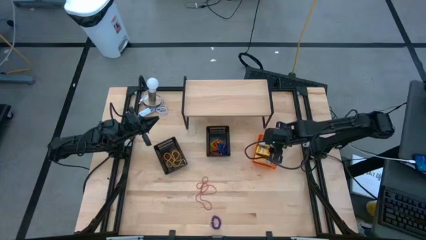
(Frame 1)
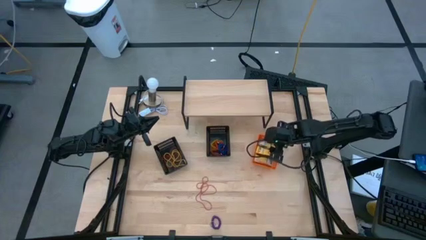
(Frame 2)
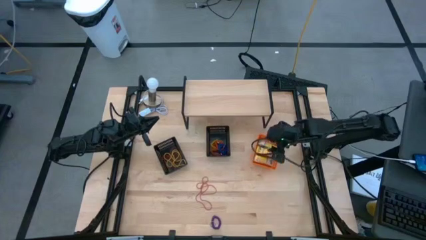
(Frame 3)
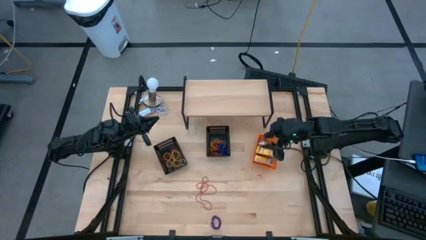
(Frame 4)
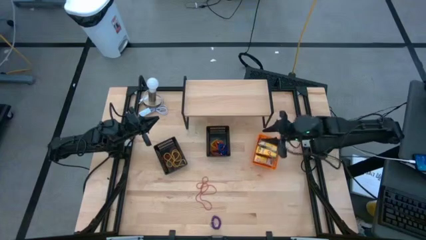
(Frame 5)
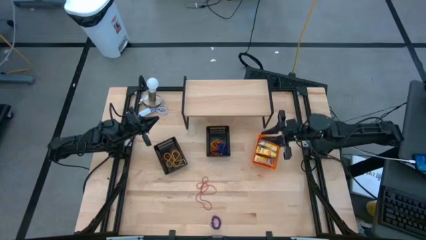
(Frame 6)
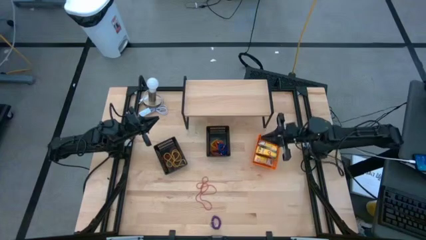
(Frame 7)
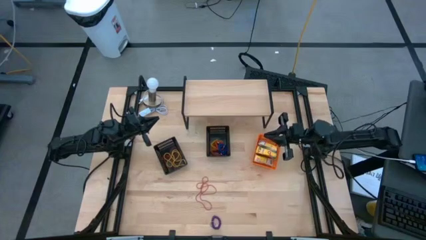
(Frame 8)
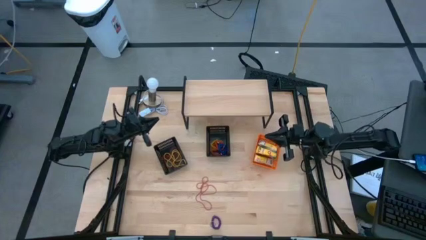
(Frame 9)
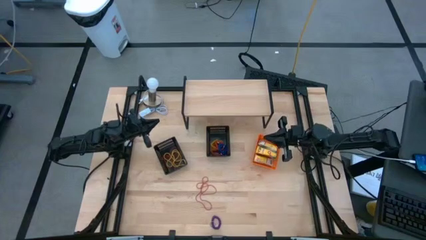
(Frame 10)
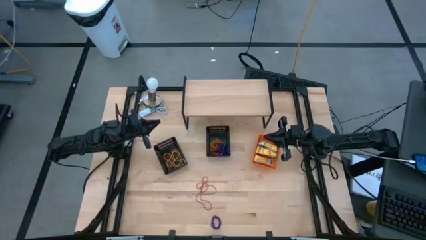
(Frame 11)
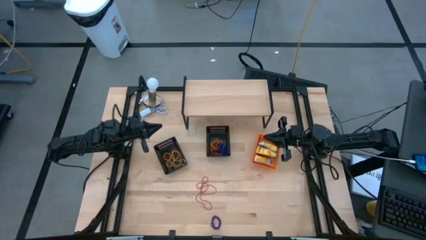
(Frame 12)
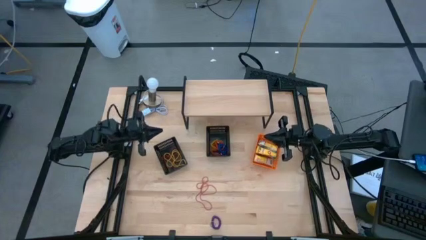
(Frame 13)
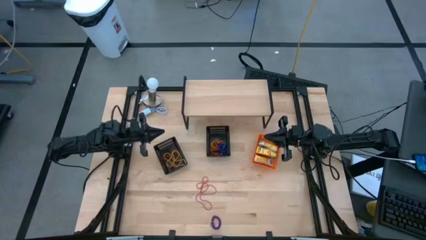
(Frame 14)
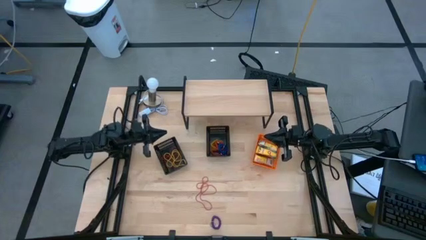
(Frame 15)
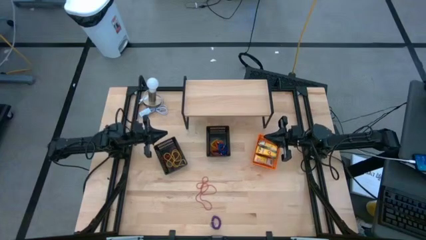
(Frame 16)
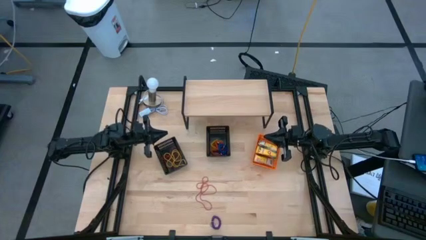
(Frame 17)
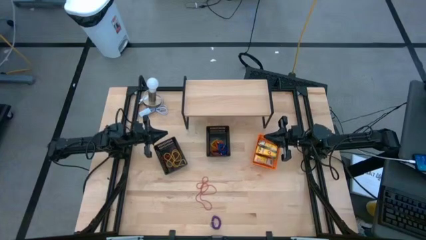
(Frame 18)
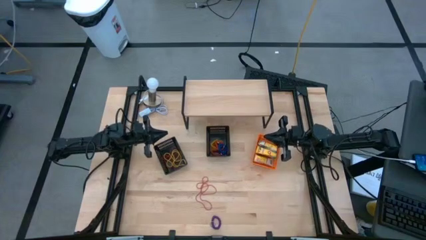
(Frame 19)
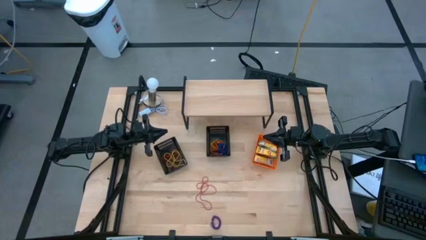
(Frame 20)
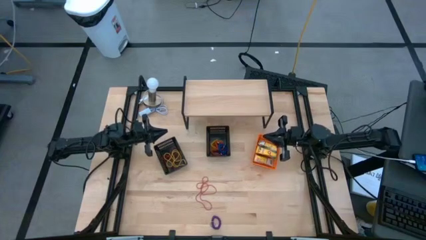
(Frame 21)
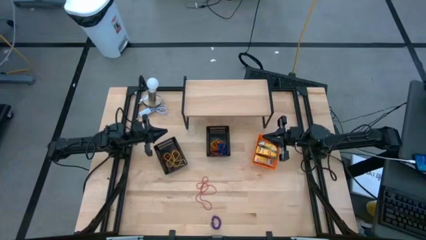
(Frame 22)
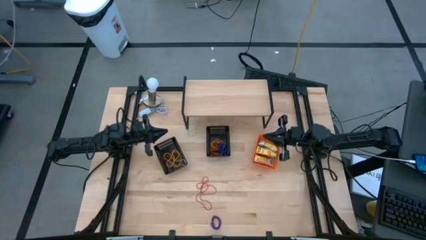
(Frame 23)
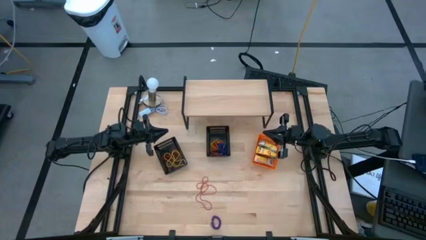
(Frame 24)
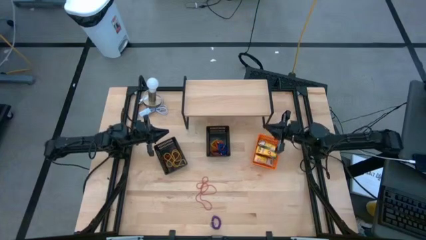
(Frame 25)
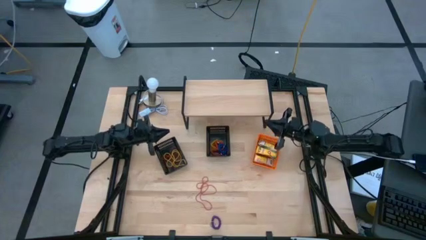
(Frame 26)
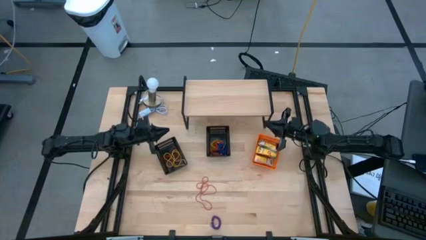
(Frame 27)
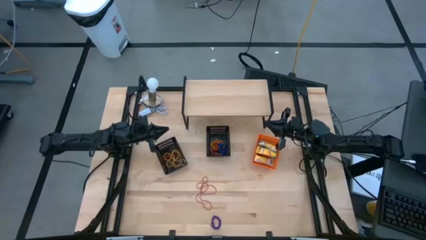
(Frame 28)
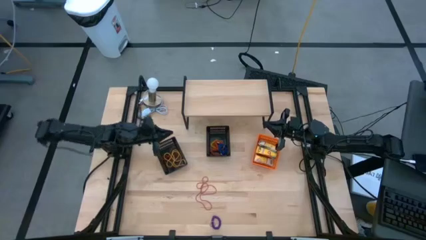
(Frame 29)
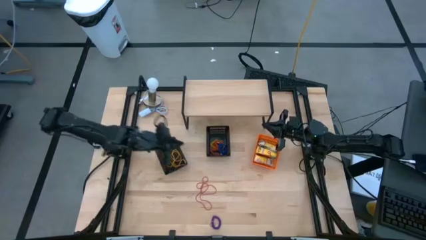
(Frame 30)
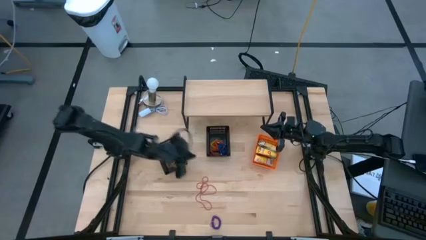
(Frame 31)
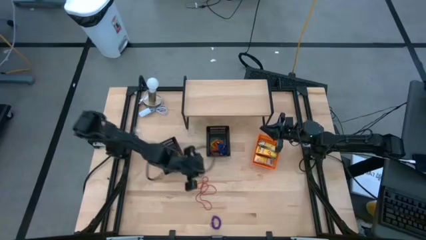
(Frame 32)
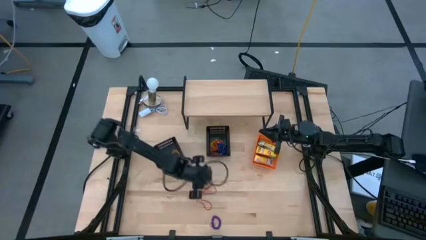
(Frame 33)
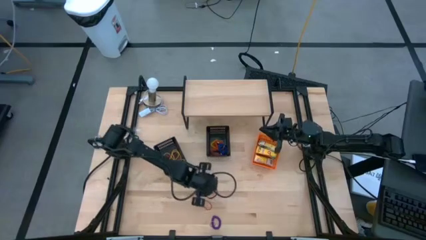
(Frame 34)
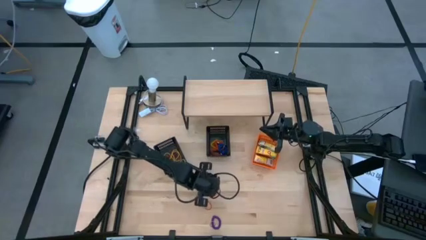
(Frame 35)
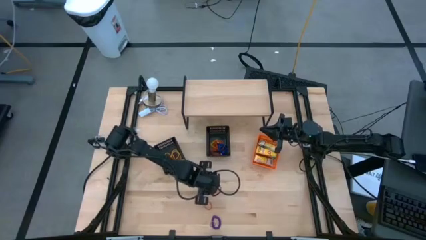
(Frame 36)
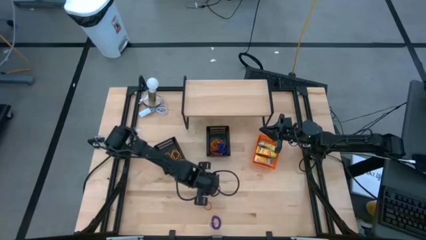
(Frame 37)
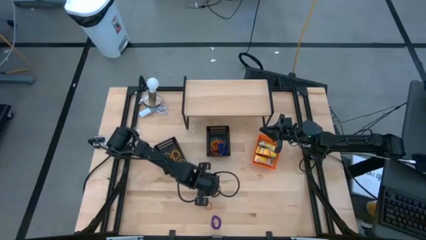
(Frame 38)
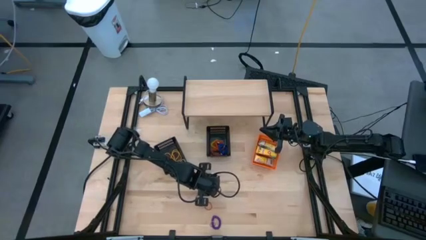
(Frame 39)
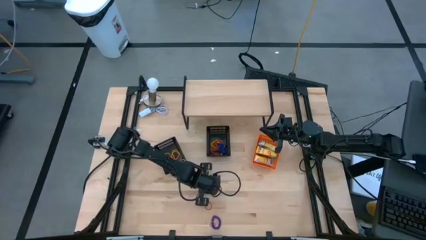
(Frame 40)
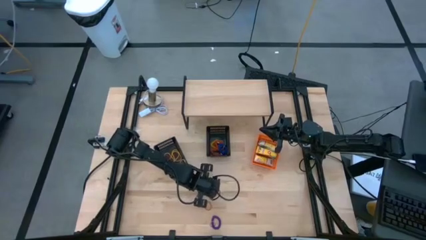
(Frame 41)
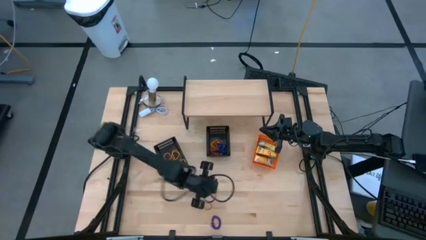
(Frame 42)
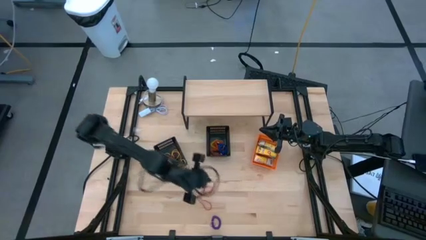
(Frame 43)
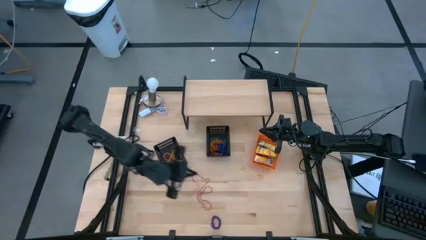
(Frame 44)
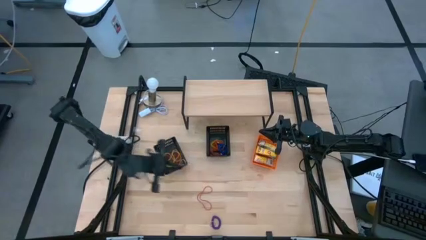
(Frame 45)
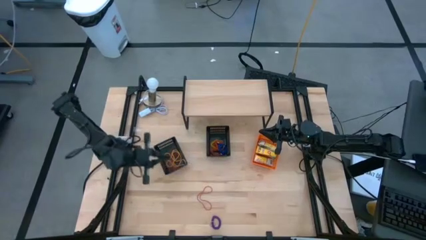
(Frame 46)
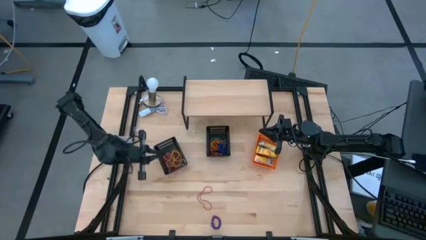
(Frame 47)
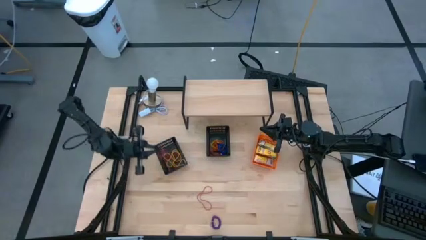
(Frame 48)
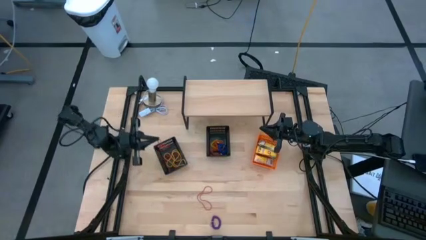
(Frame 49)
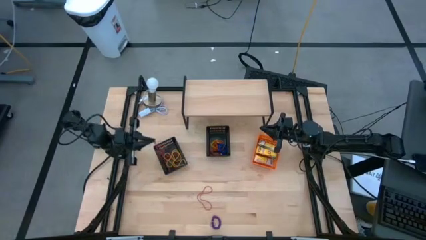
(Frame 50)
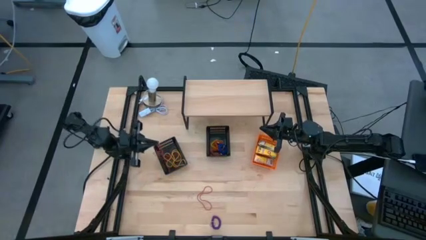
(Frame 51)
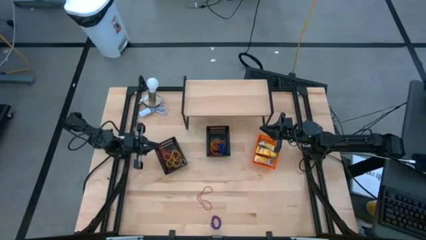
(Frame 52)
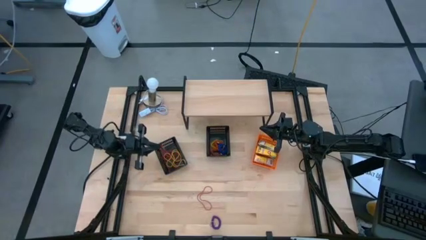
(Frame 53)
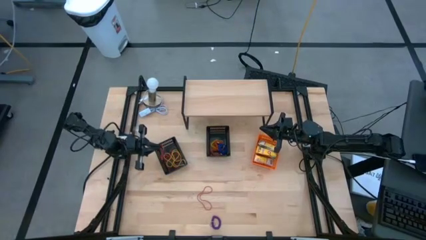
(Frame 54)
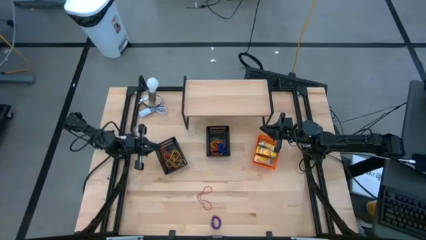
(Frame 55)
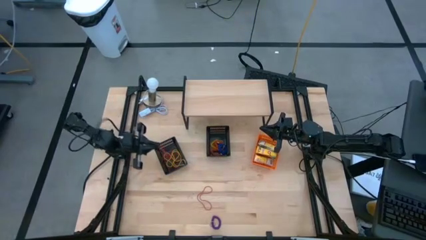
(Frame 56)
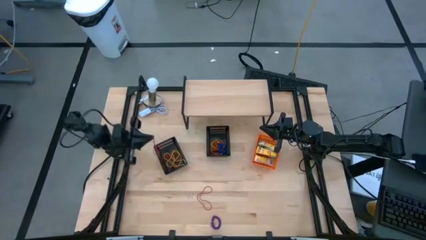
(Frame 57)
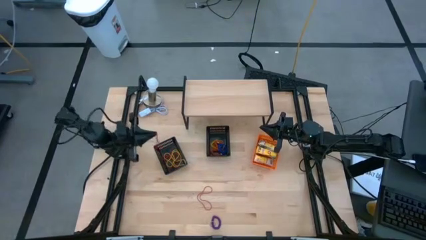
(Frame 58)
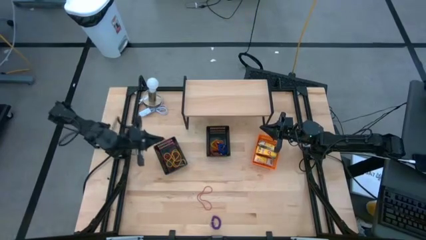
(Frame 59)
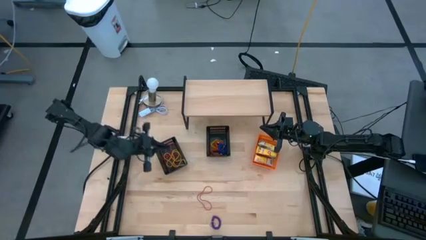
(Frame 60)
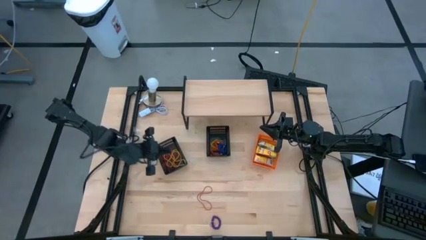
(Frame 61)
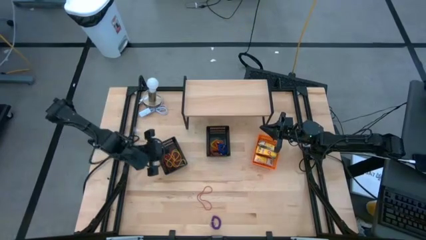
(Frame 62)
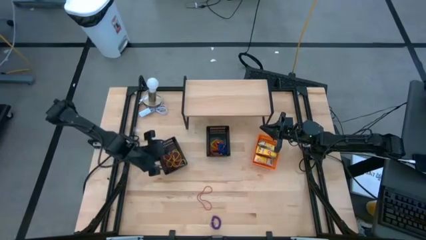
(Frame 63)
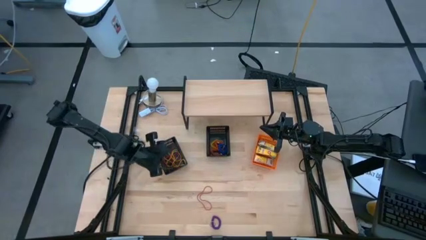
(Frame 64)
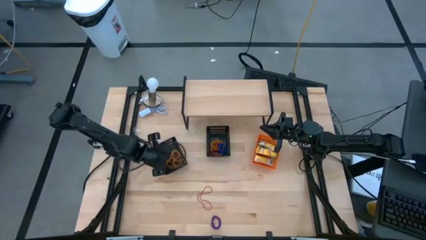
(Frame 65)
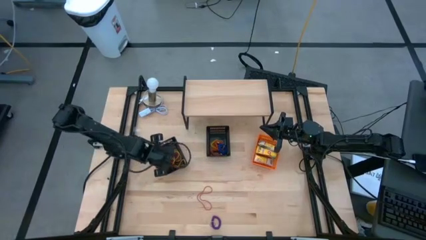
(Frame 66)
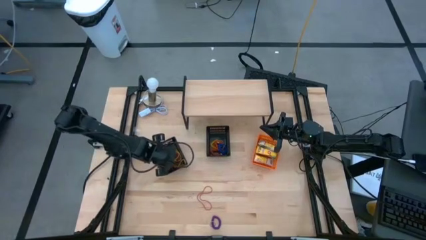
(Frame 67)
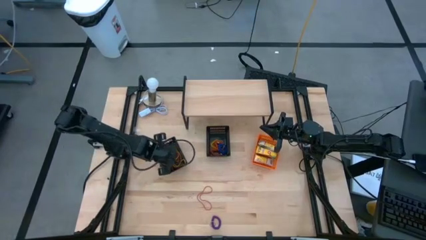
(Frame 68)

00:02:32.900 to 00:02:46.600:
Task: Pick & Place Office Desk Supplies
Put the red rubber band into the left black basket

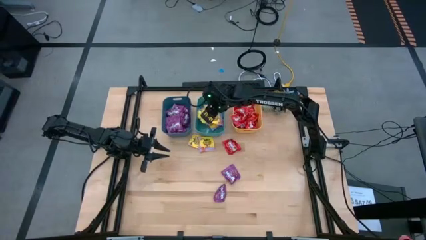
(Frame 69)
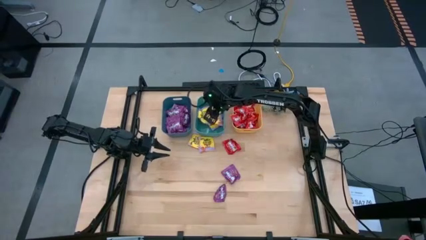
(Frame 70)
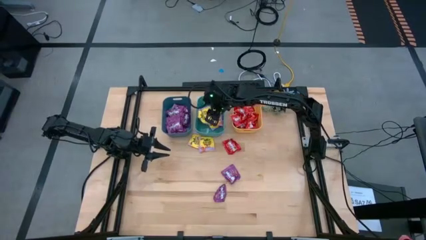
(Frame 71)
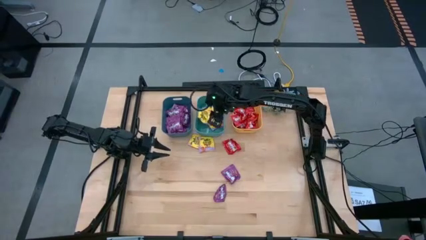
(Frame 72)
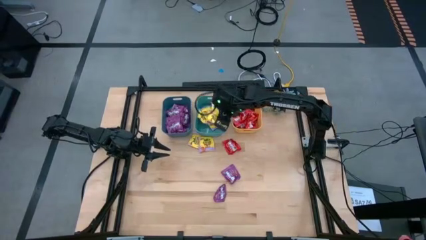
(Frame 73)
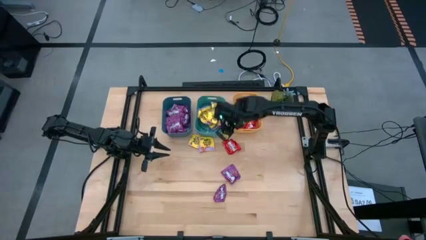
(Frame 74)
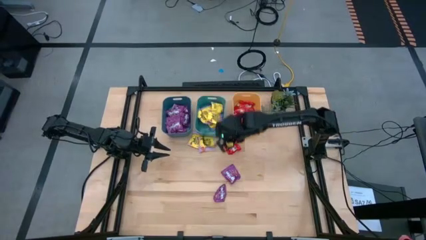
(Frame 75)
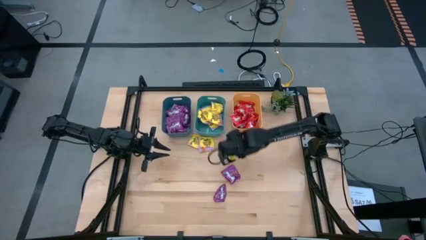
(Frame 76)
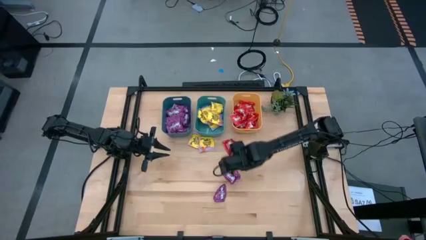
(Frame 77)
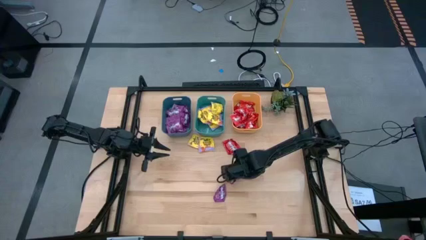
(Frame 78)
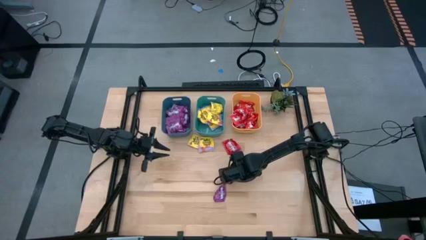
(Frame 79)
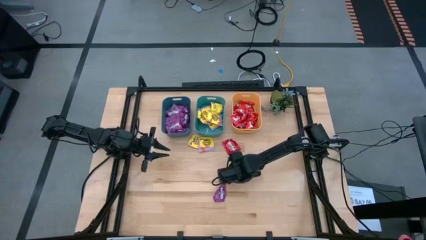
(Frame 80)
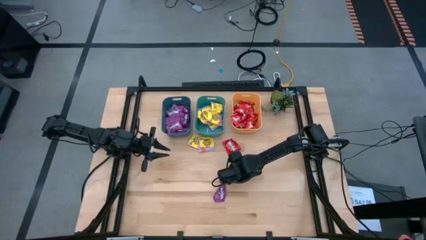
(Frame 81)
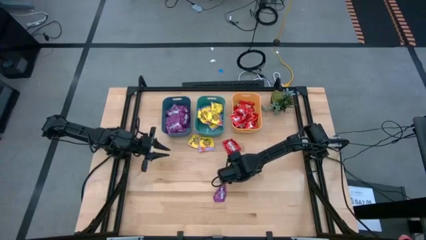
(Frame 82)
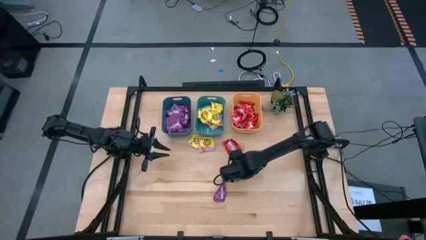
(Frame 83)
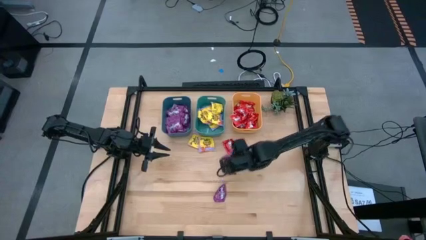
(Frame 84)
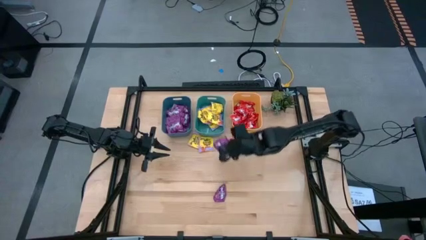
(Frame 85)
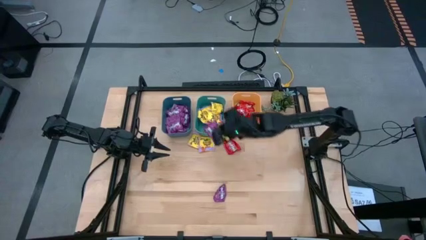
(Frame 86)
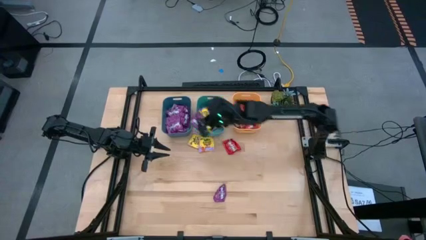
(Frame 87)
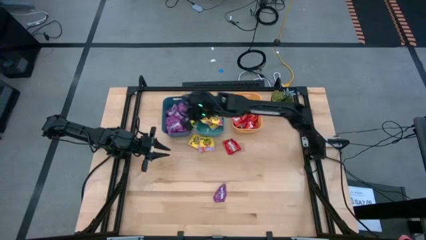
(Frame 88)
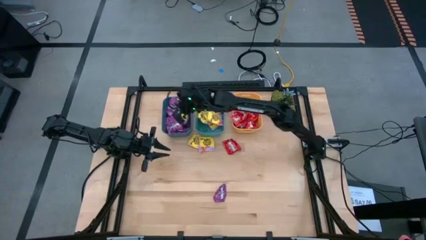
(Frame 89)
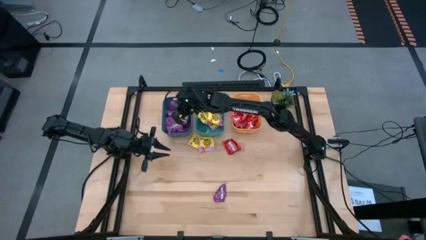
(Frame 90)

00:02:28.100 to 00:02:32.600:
Task: Sort candy
Put the violet candy into the blue bin
